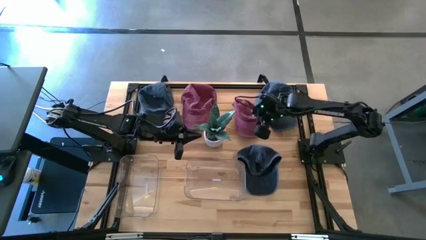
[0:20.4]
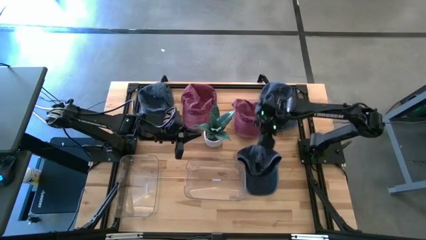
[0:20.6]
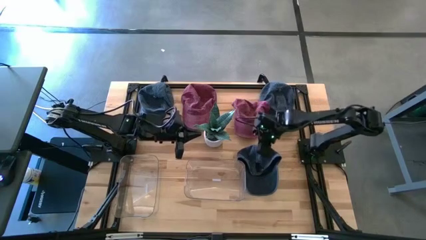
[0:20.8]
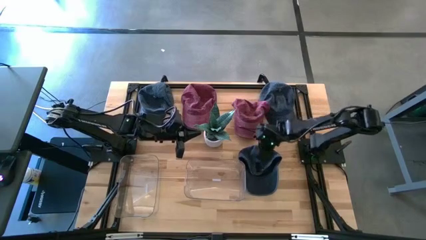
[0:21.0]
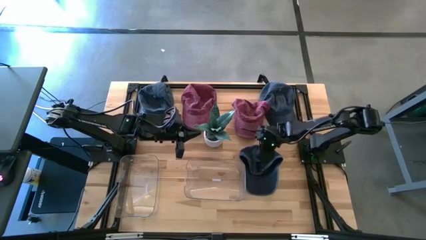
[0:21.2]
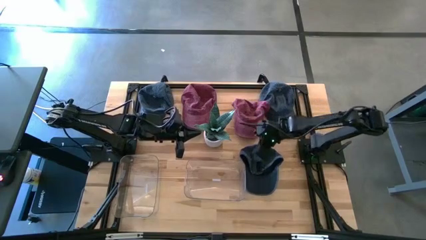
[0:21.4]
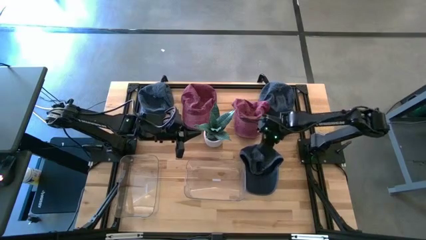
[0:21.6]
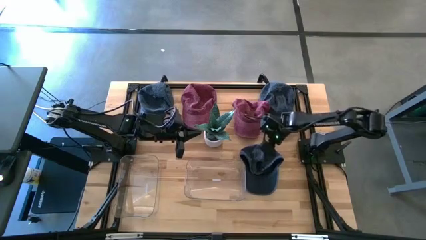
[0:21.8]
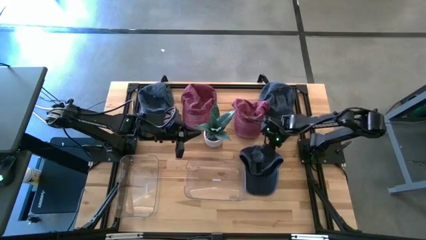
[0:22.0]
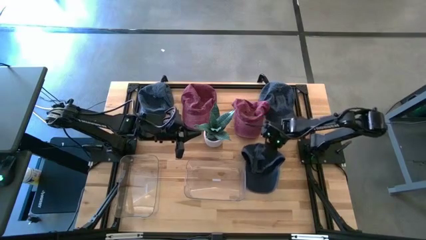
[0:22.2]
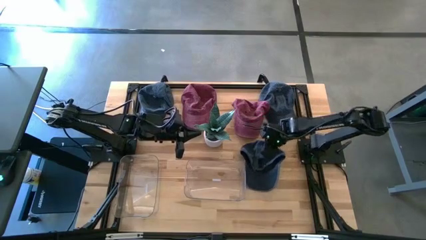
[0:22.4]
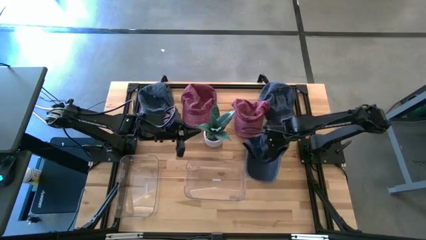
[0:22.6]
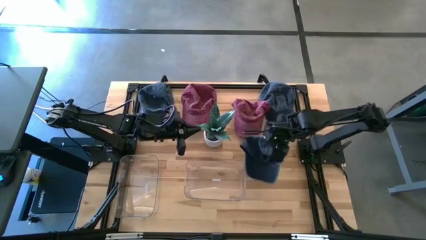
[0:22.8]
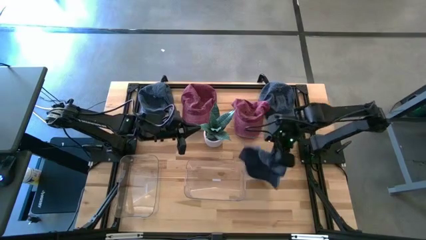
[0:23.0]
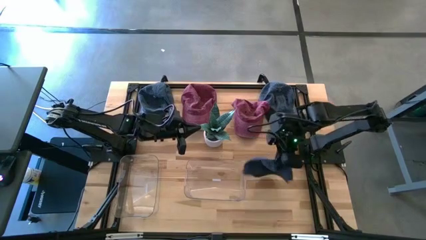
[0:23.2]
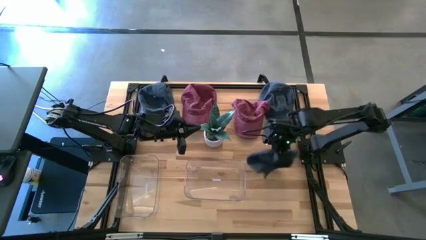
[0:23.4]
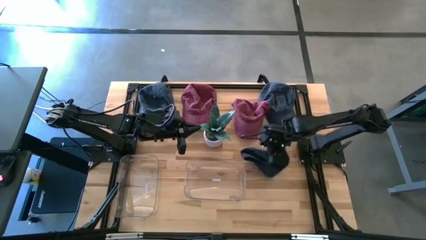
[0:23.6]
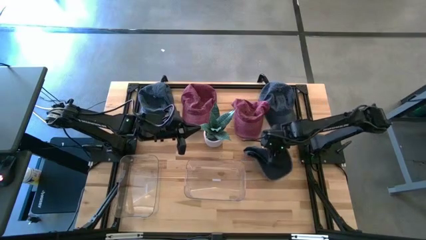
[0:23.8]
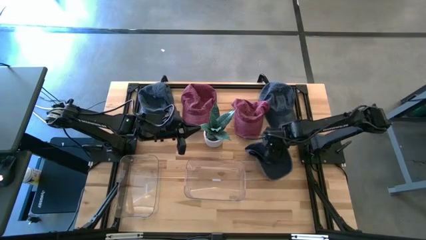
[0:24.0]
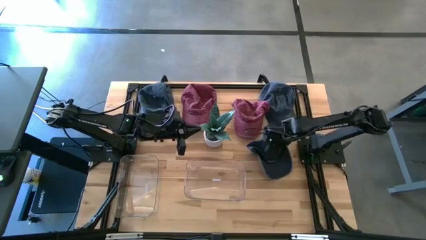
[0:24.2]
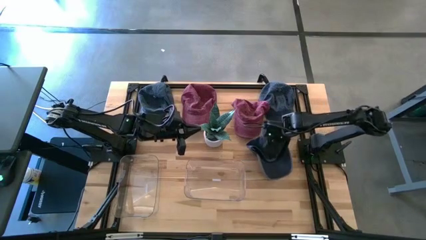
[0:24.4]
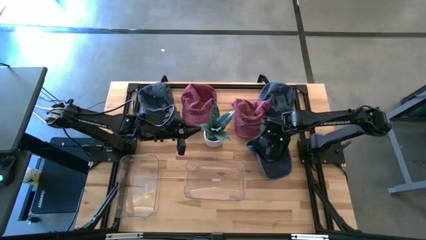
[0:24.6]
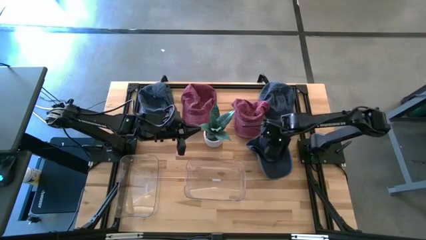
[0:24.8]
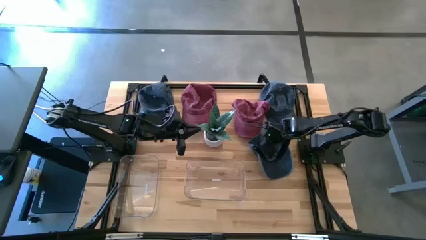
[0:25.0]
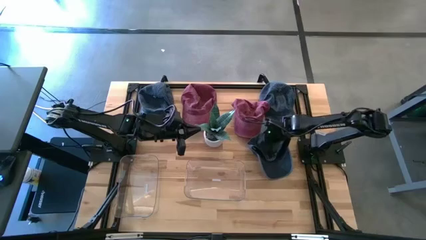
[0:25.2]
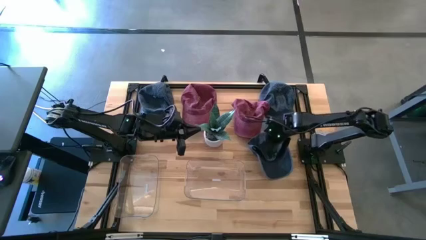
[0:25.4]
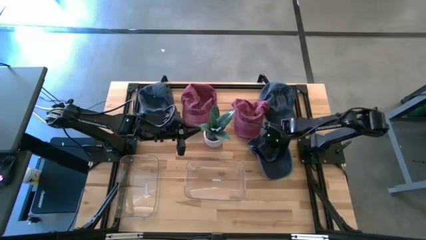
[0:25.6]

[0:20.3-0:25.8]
Task: Pick & Place hat
Put the bottom blue cap into the left transparent bin

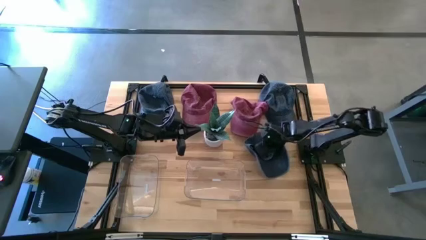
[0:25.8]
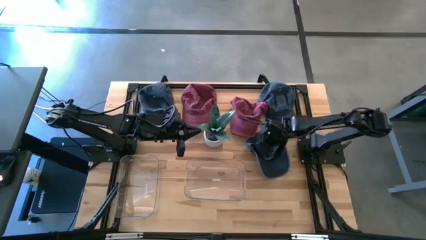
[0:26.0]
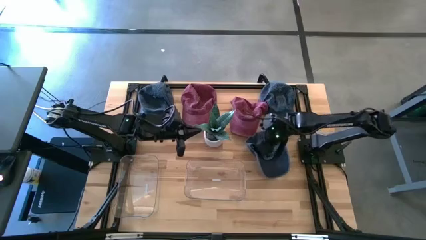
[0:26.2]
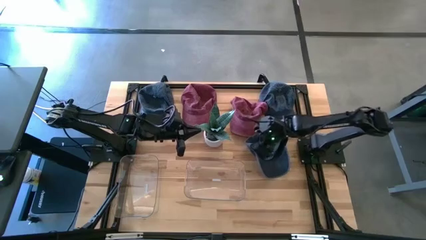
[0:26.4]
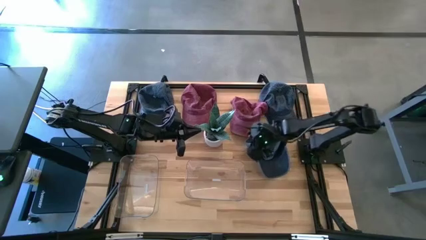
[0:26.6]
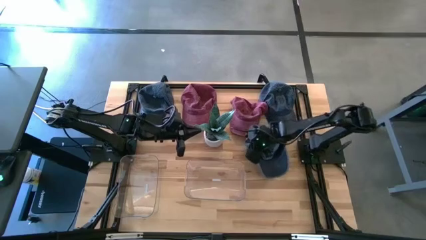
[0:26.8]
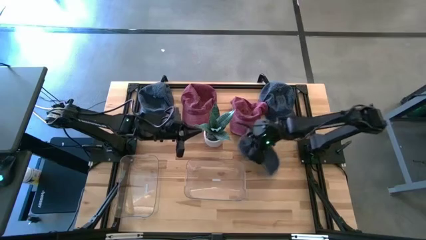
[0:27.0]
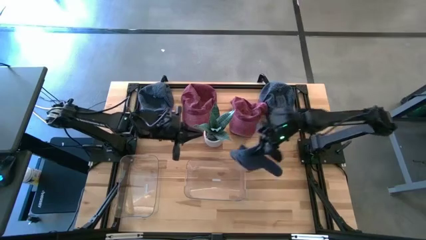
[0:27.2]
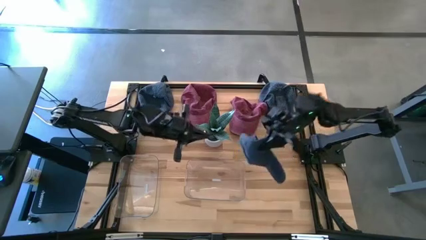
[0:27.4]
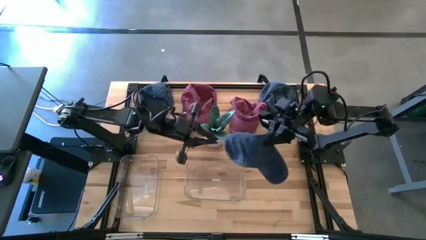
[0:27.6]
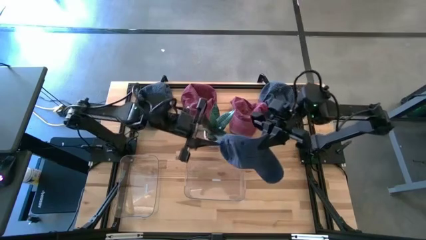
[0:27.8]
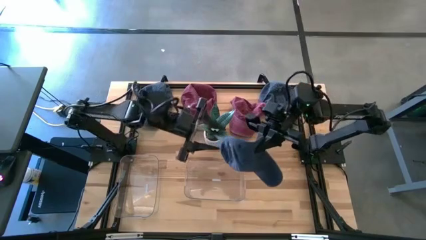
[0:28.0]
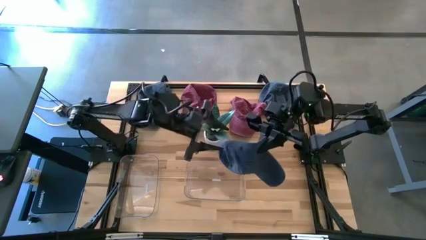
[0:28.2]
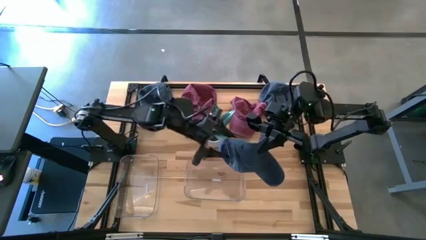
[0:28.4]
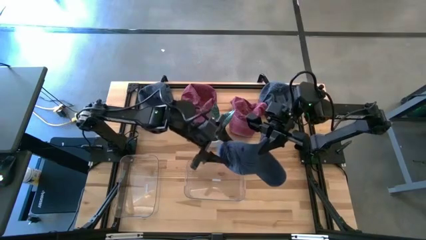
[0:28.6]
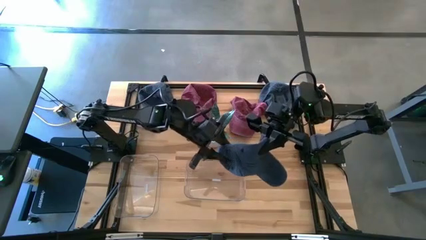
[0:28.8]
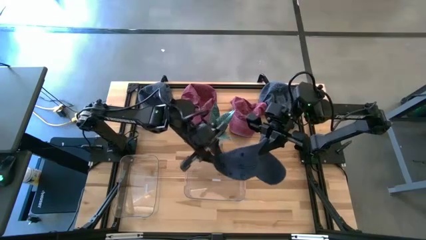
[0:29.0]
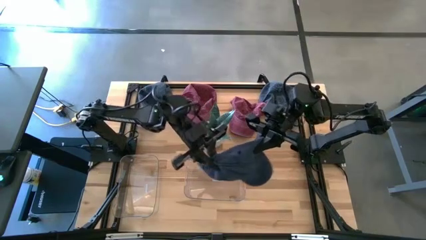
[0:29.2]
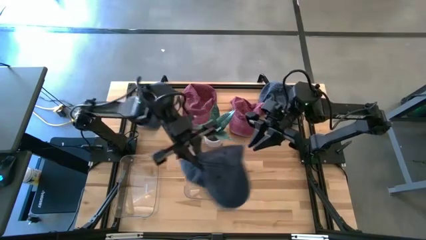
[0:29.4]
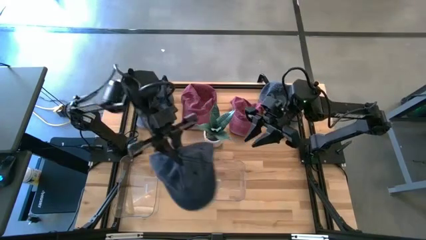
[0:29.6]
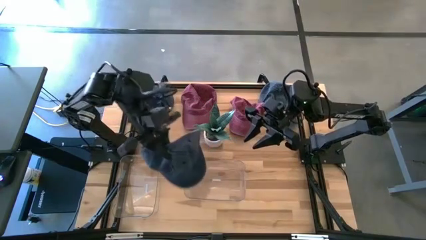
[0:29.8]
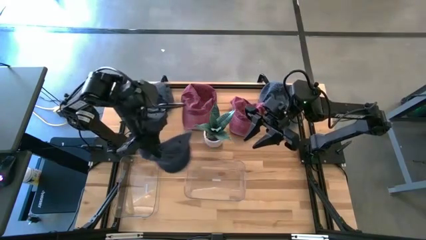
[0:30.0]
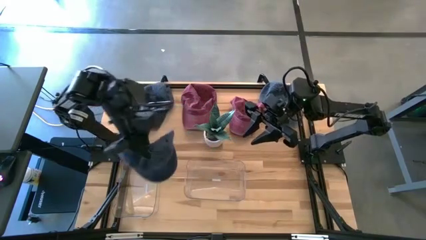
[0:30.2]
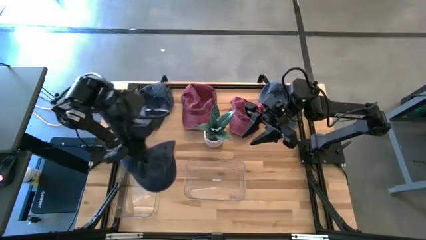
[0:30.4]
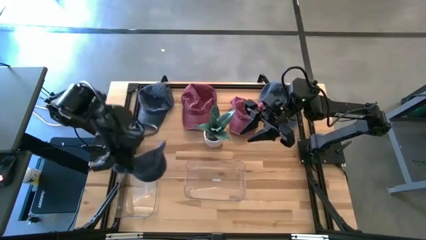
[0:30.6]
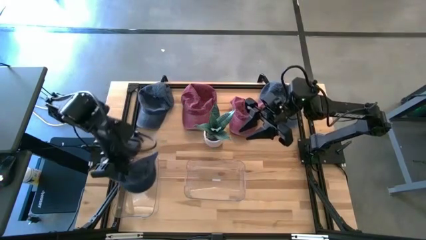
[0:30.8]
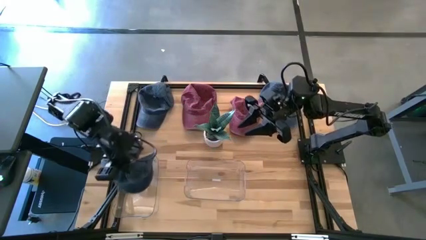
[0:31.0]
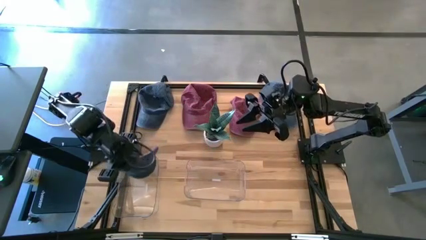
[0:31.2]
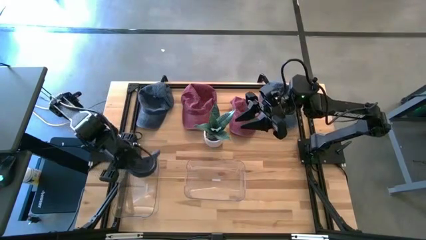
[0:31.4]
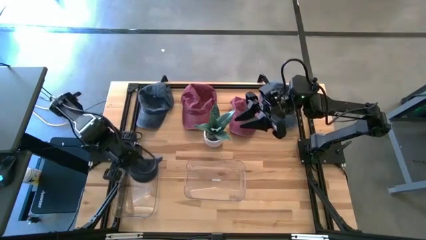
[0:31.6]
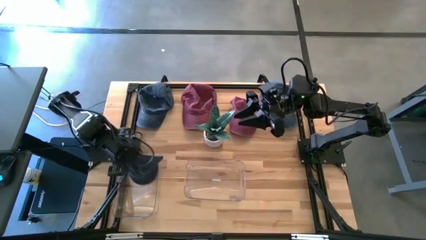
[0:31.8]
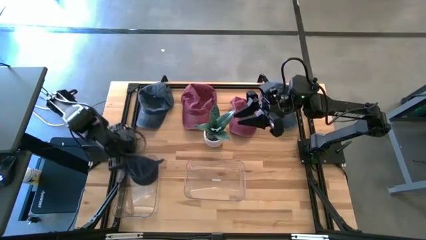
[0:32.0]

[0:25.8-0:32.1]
Put the bottom blue cap into the left transparent bin

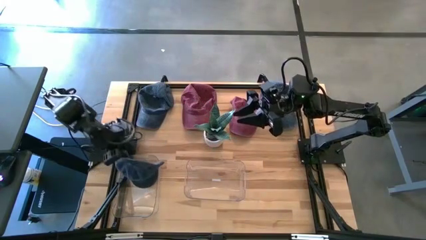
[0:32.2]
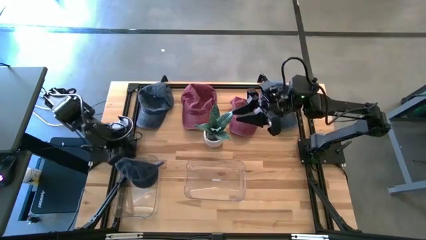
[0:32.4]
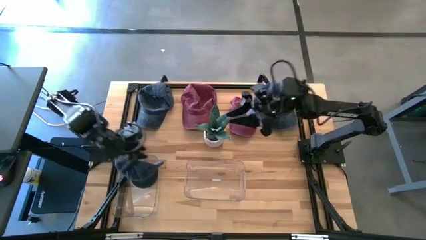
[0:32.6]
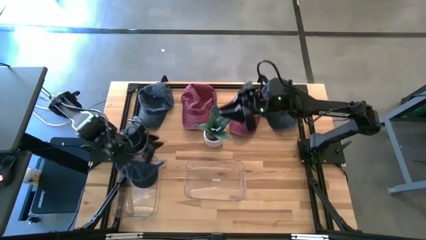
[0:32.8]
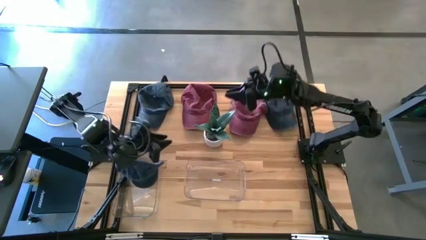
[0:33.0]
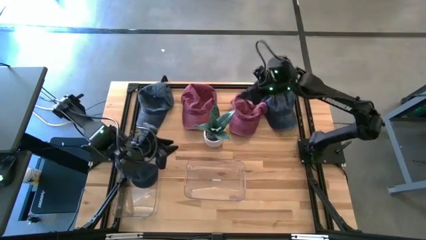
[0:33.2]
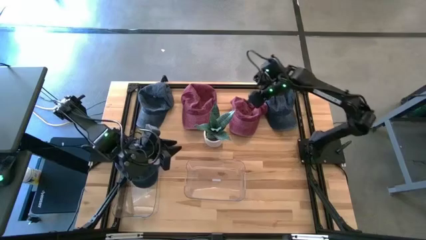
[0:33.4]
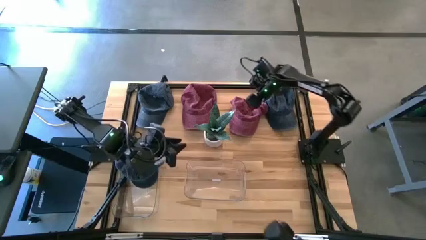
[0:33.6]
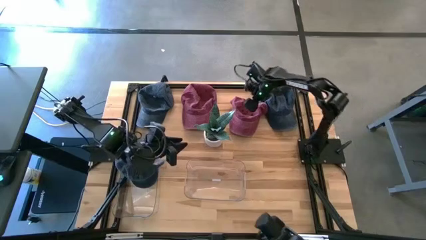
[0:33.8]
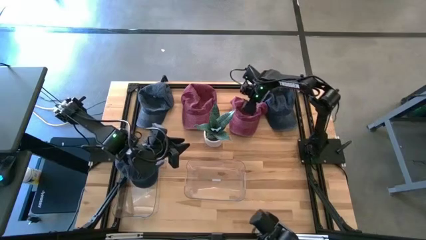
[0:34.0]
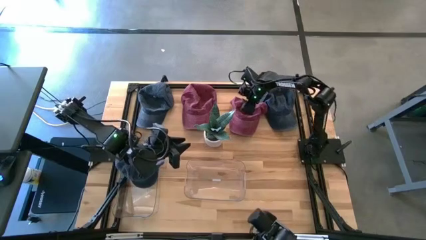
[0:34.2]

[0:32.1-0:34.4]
Put the right red cap into the right transparent bin
